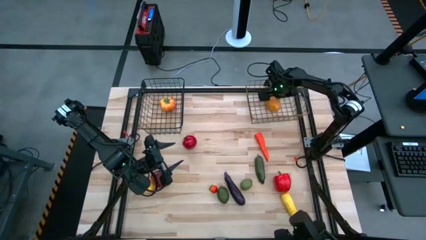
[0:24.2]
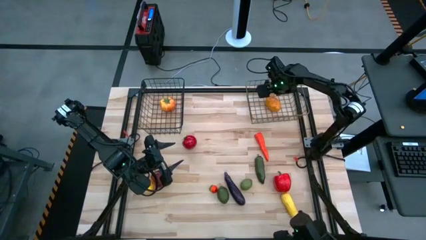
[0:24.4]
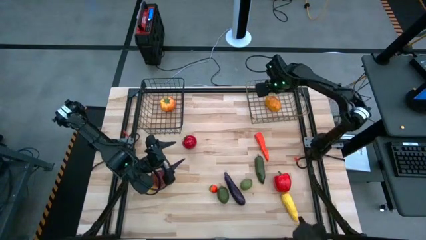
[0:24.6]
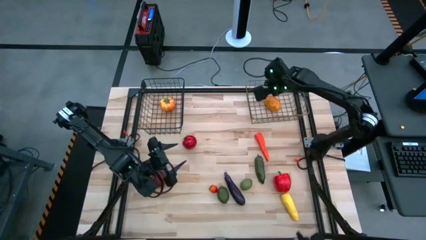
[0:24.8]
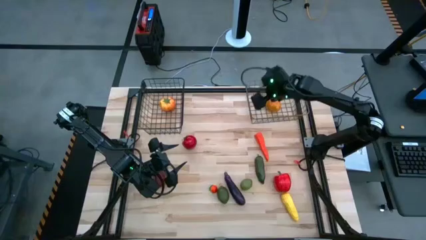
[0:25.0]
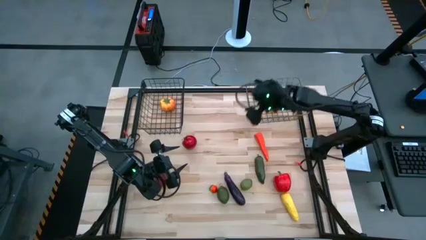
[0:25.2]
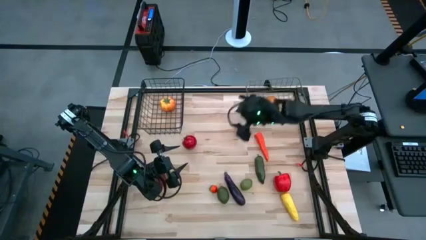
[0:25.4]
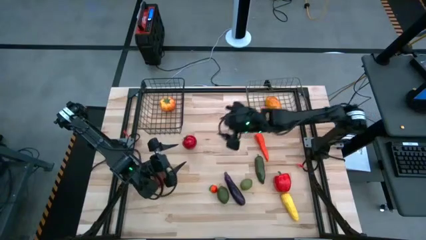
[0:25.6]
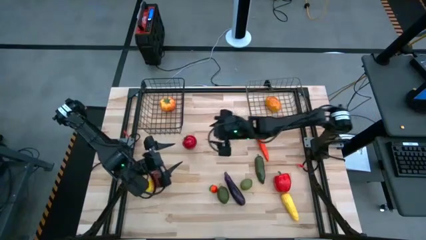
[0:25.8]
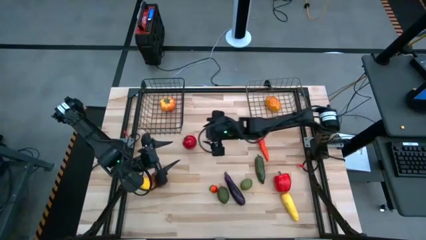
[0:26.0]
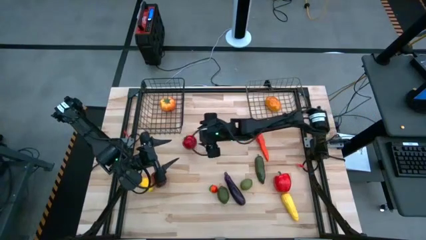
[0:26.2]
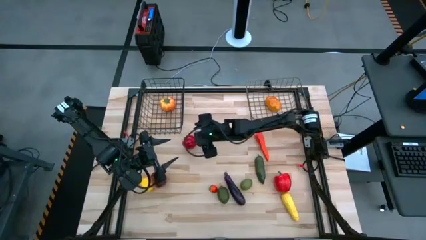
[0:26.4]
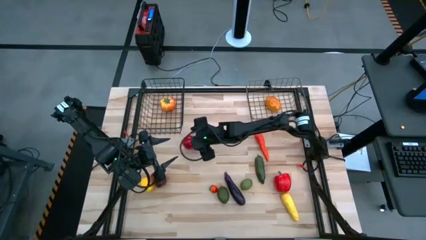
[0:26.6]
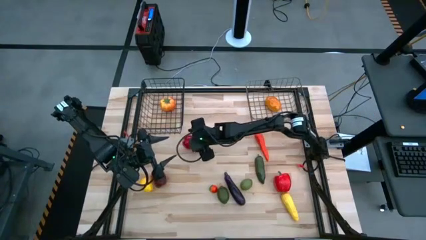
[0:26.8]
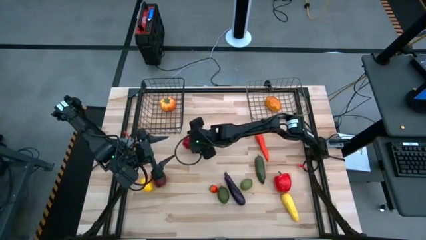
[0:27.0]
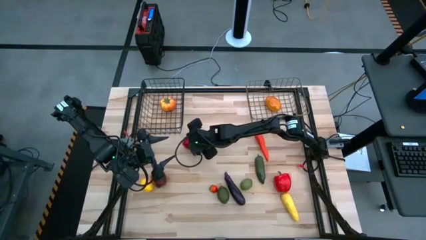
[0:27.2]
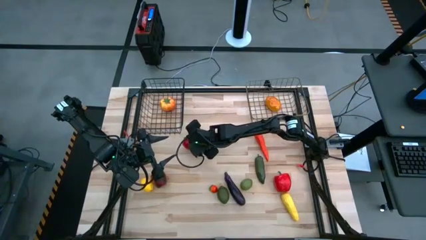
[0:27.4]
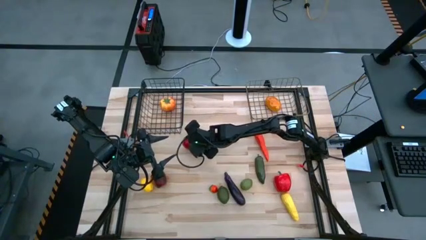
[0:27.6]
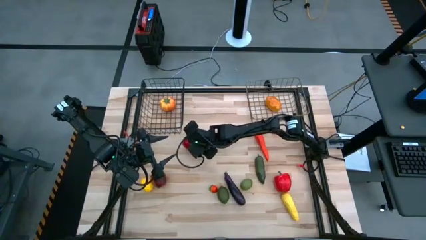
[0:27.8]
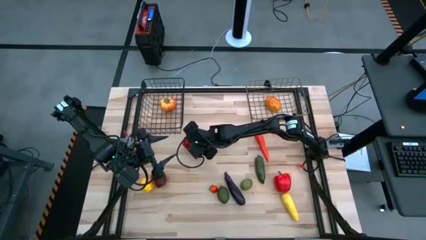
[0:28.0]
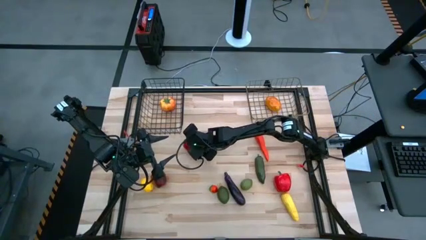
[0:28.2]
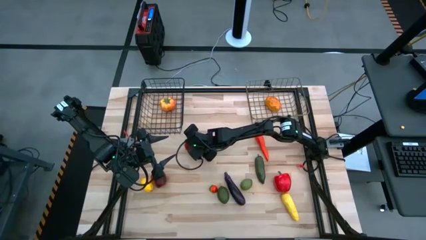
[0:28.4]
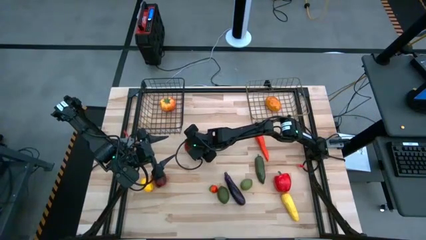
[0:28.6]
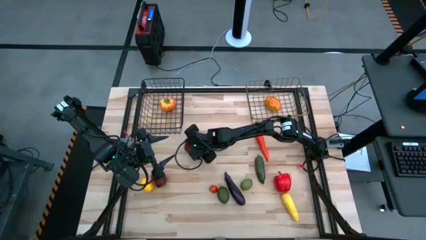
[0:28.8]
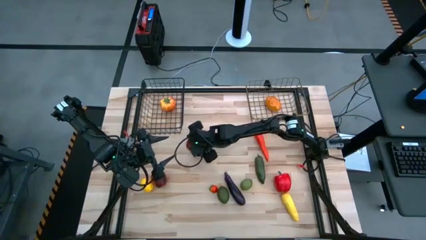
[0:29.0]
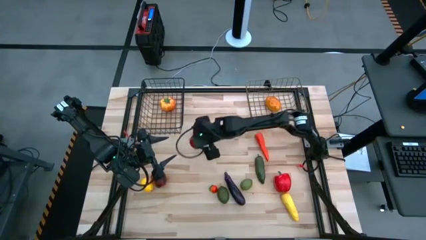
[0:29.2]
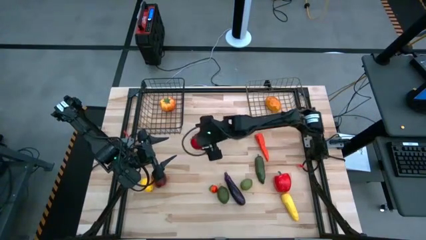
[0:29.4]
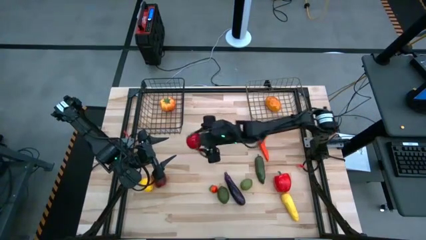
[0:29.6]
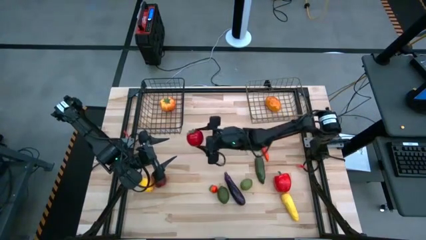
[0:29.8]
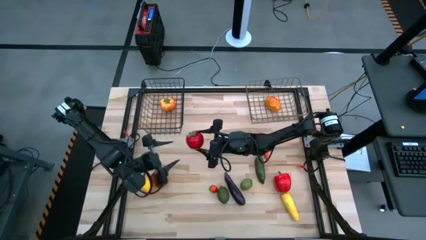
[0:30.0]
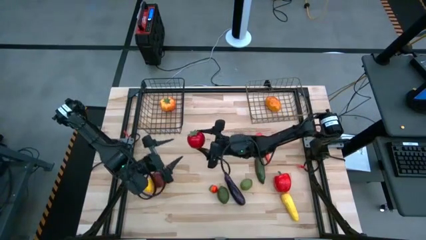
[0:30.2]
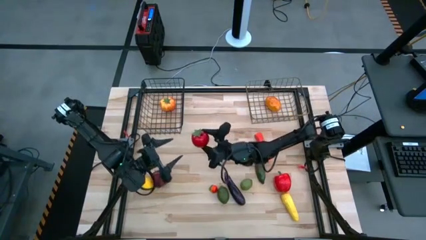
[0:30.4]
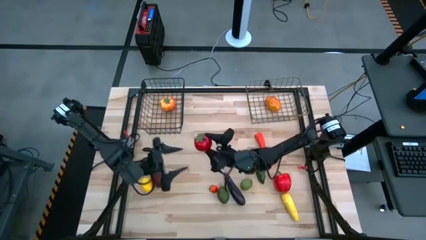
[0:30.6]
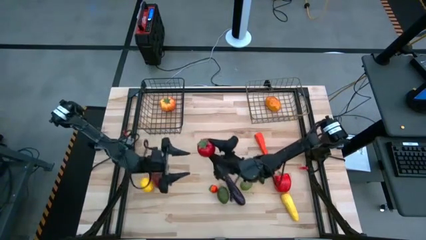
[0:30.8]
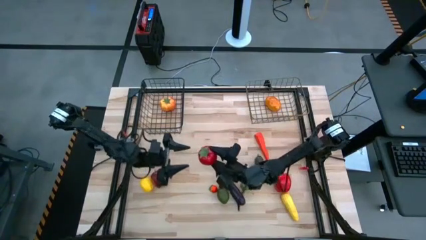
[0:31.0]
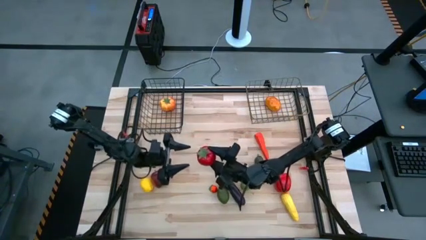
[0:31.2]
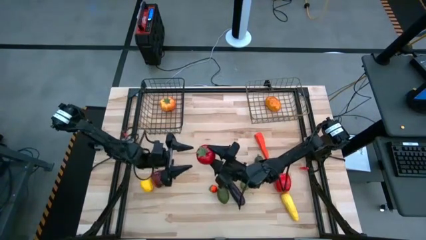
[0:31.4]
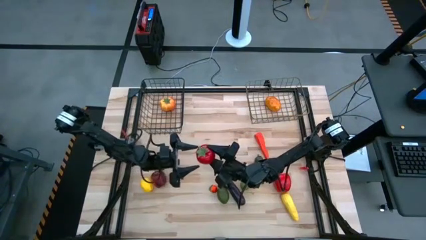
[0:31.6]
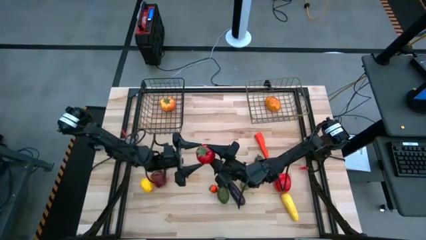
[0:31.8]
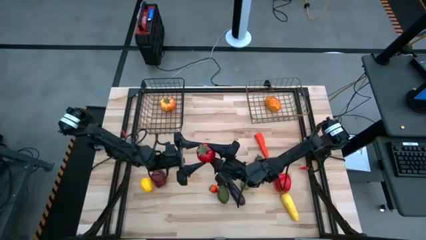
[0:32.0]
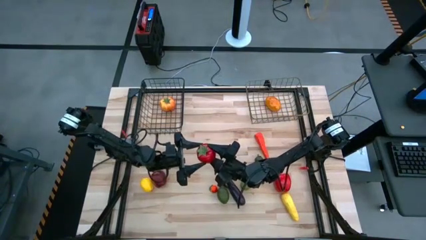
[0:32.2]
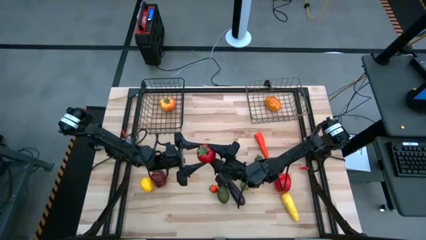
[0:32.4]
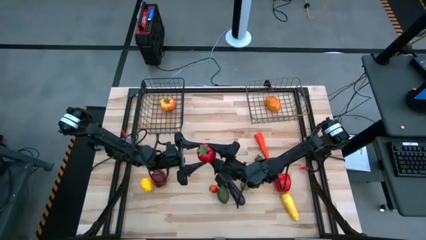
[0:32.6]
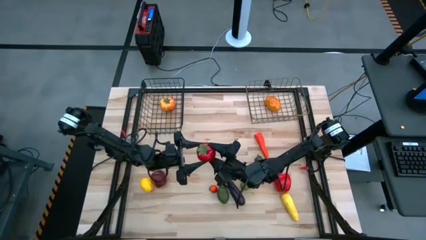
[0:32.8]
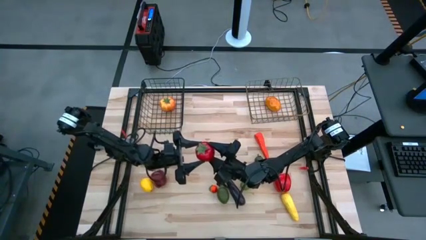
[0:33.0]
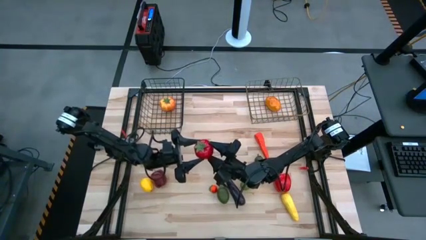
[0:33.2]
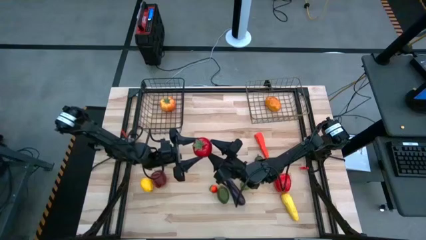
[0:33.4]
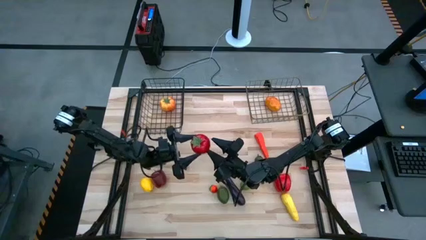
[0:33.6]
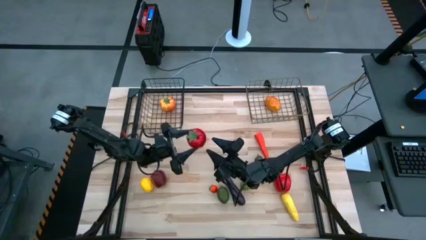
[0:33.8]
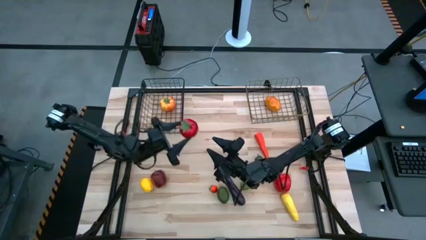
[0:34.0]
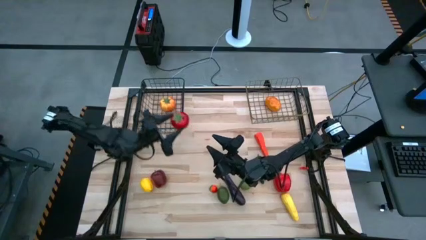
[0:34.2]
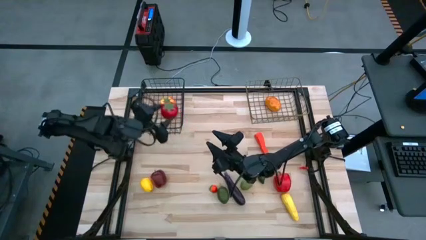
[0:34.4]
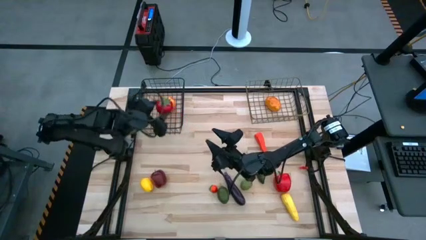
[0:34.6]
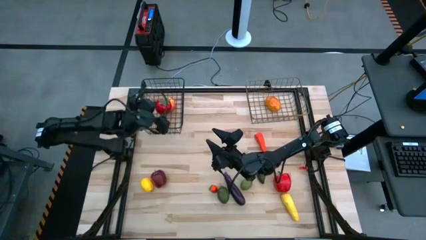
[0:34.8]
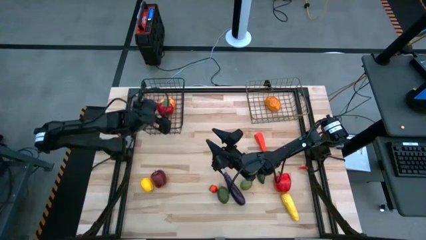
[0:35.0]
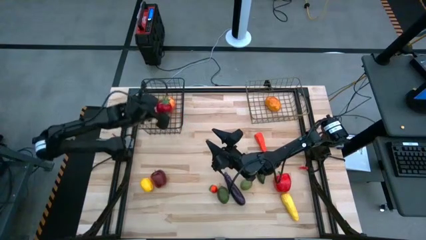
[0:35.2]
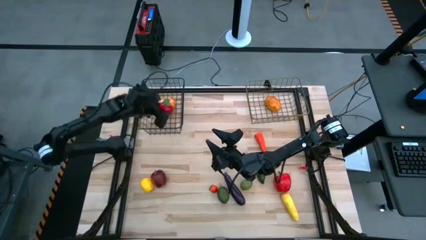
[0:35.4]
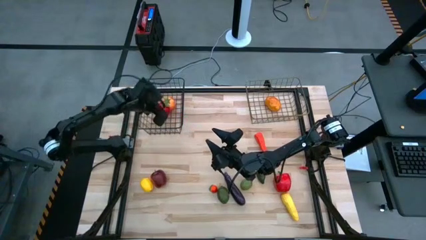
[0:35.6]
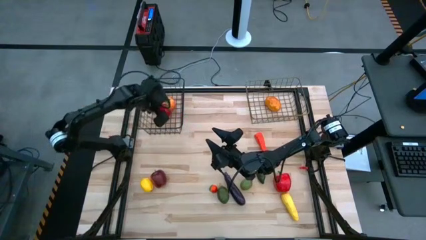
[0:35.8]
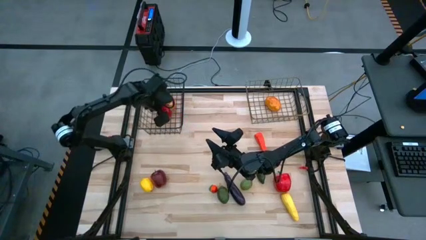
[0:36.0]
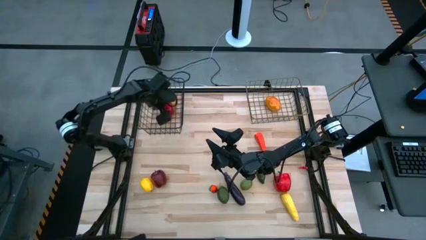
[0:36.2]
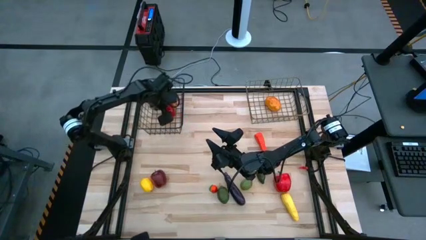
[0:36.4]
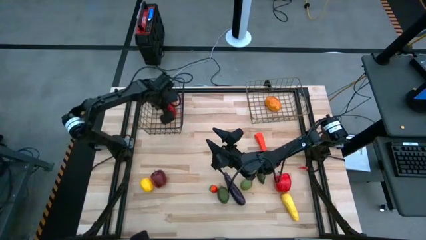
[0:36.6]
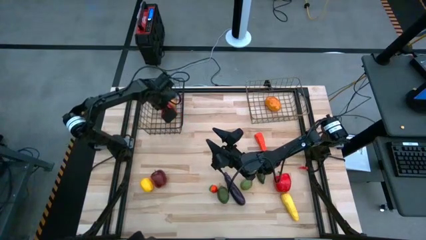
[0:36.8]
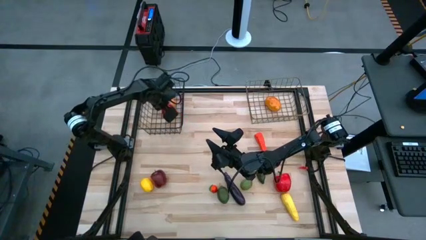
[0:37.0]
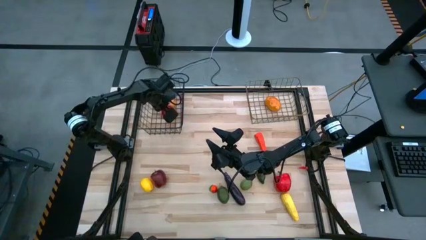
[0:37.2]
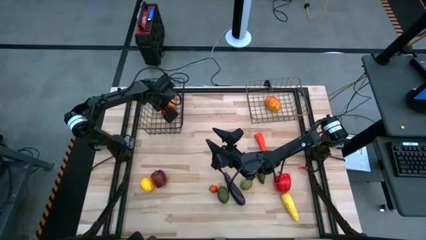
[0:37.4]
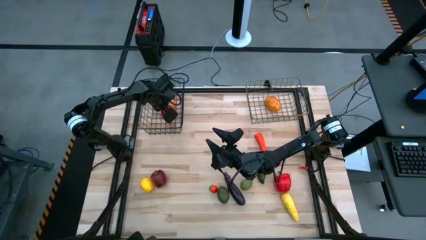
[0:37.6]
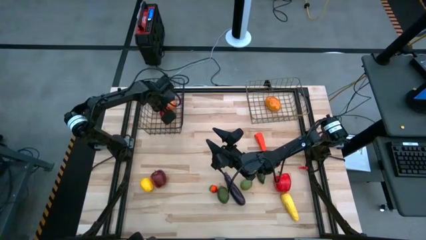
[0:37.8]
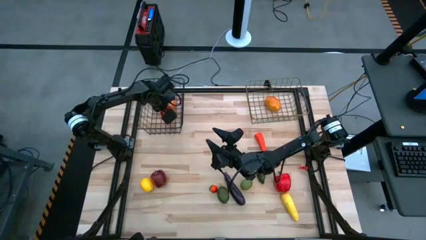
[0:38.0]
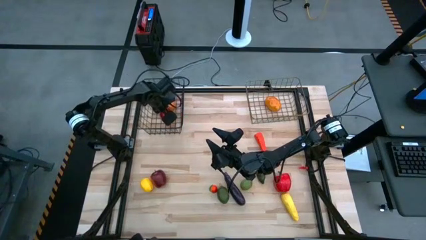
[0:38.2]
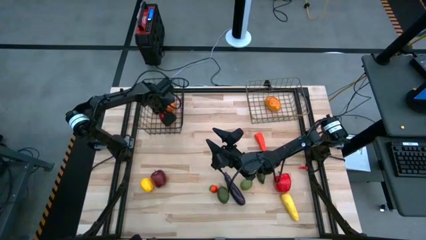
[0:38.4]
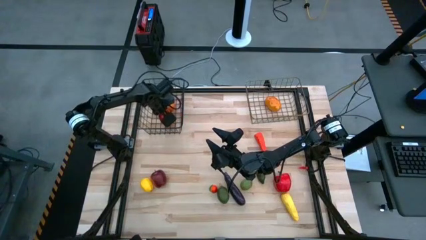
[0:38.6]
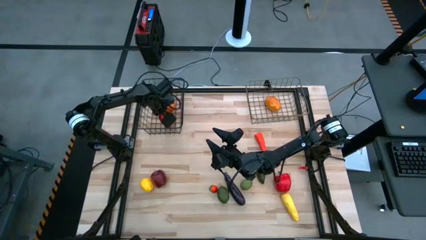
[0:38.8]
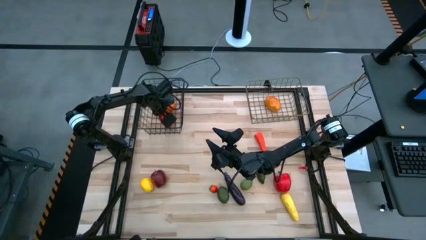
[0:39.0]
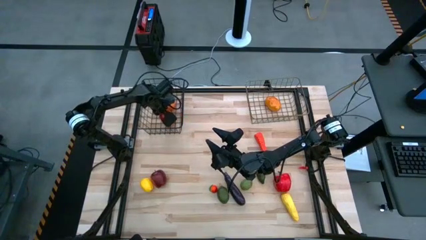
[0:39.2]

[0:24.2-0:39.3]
Task: Sort produce into baskets
Put the top red tomato into the left wire basket
